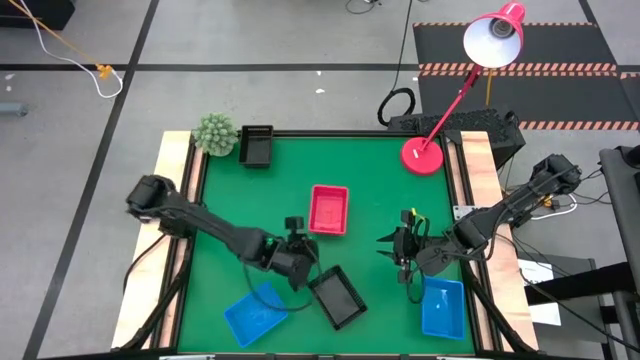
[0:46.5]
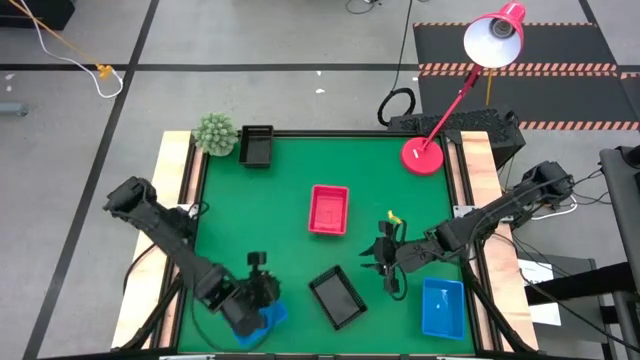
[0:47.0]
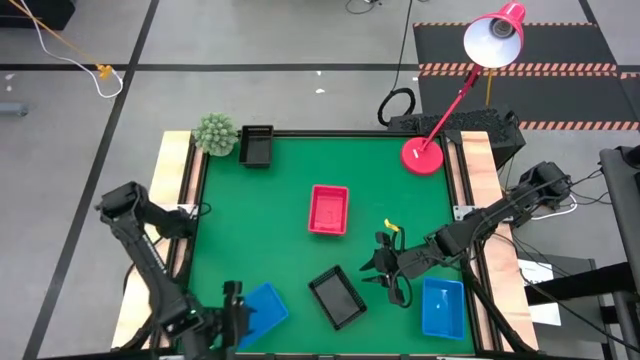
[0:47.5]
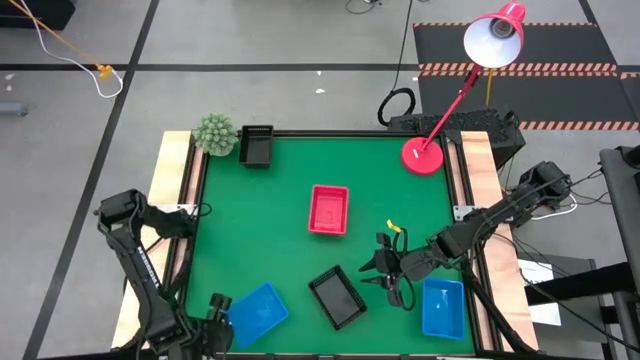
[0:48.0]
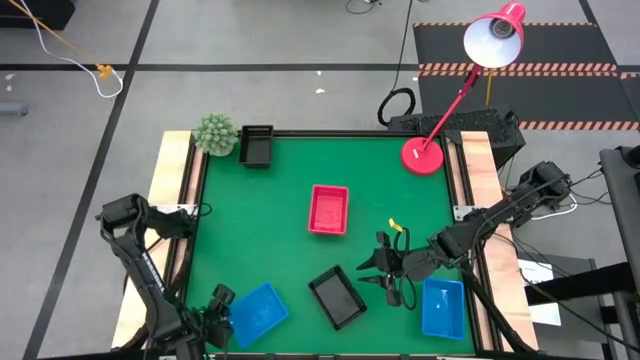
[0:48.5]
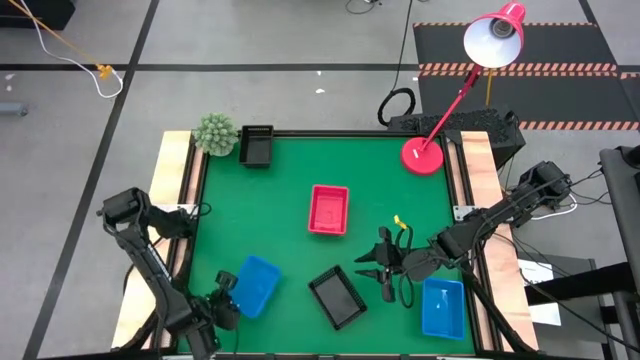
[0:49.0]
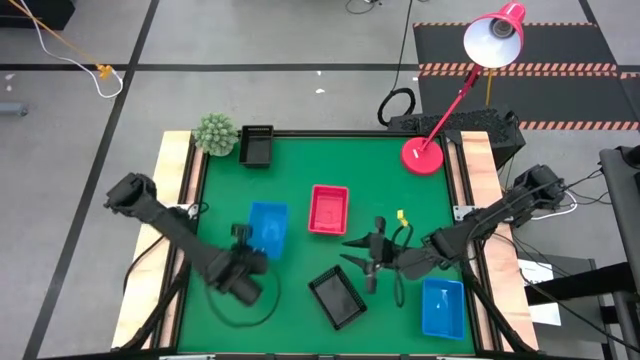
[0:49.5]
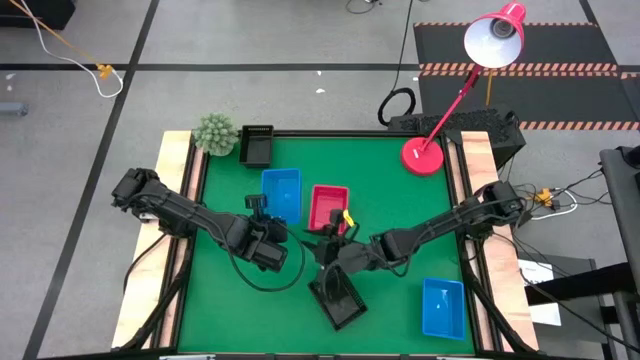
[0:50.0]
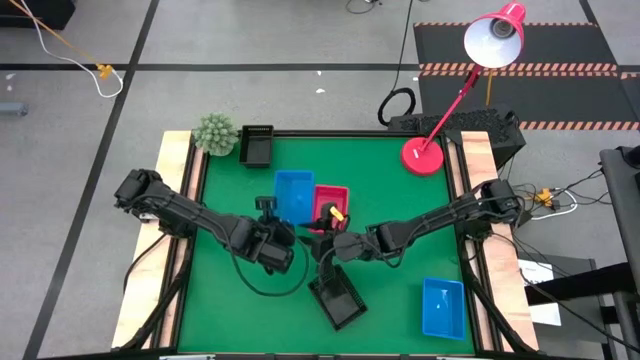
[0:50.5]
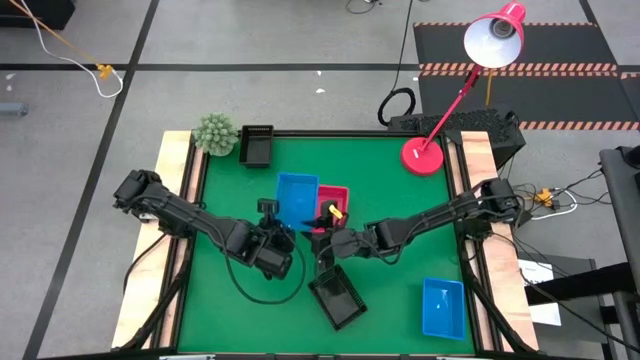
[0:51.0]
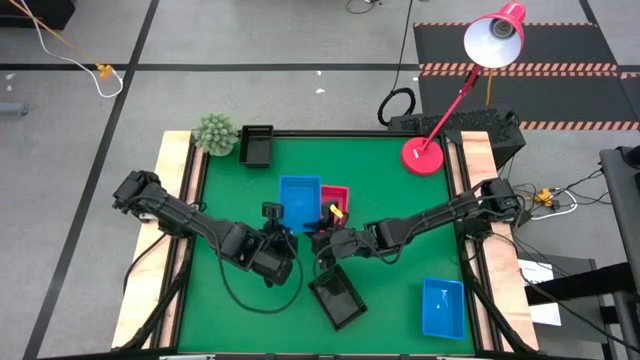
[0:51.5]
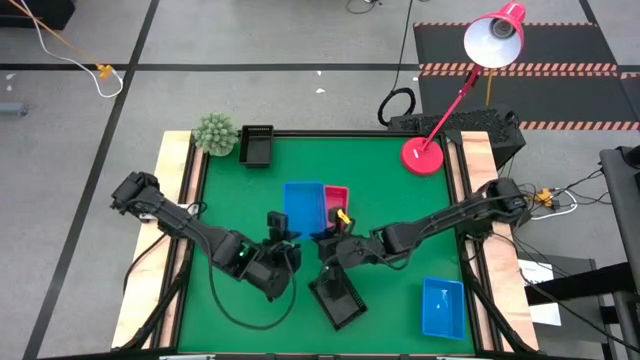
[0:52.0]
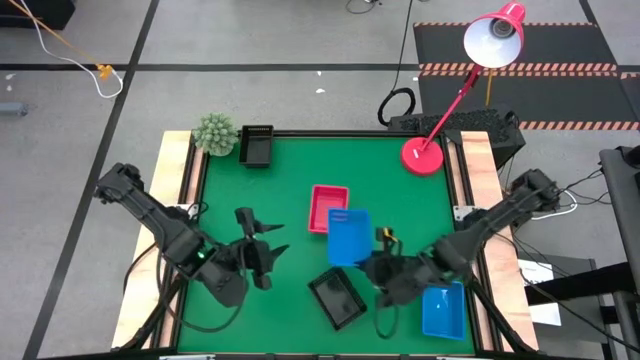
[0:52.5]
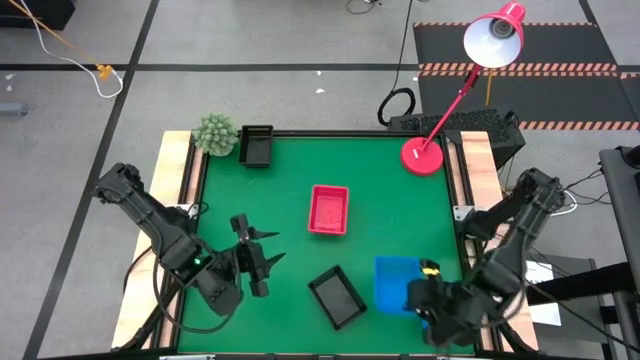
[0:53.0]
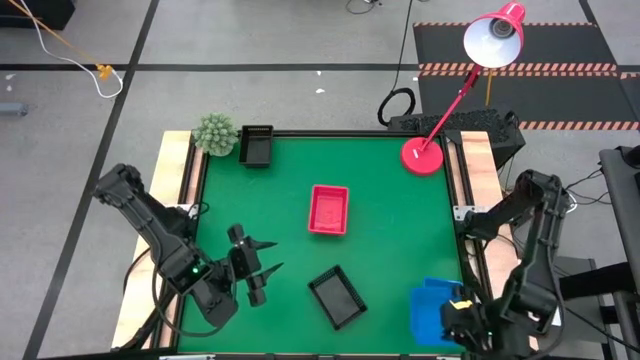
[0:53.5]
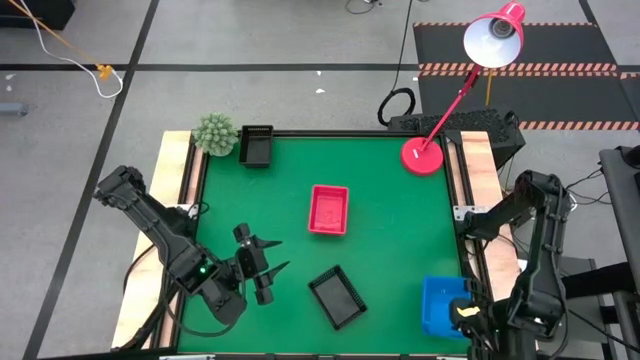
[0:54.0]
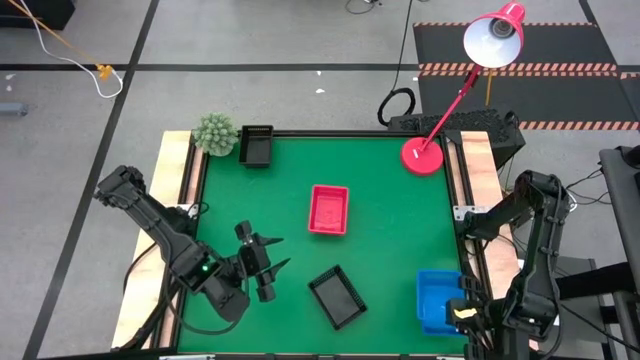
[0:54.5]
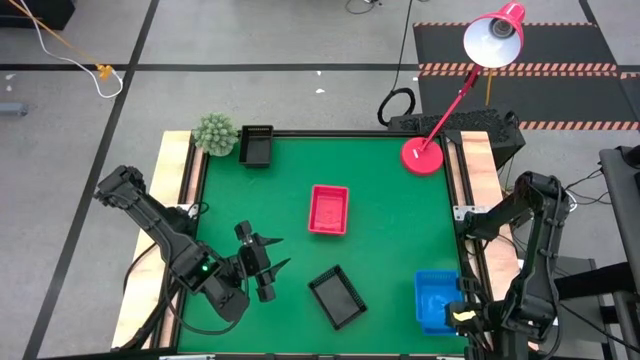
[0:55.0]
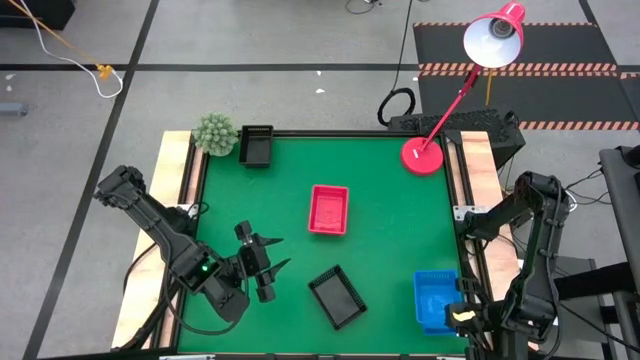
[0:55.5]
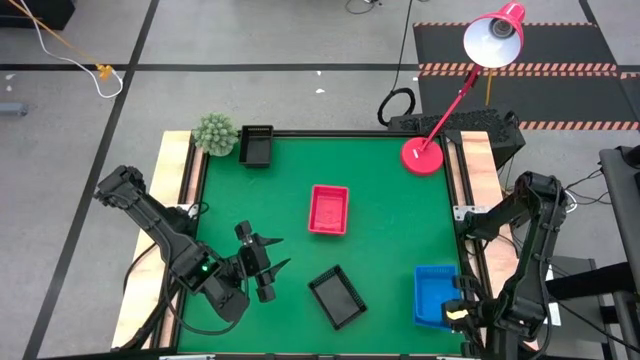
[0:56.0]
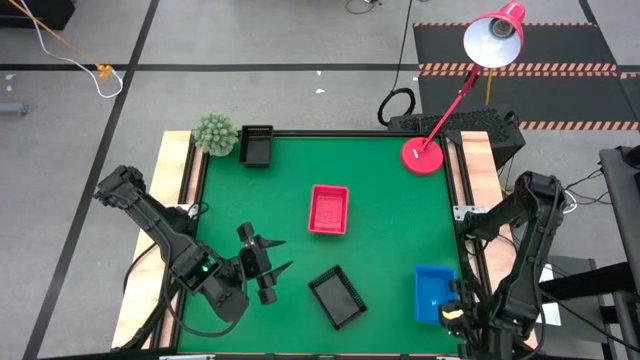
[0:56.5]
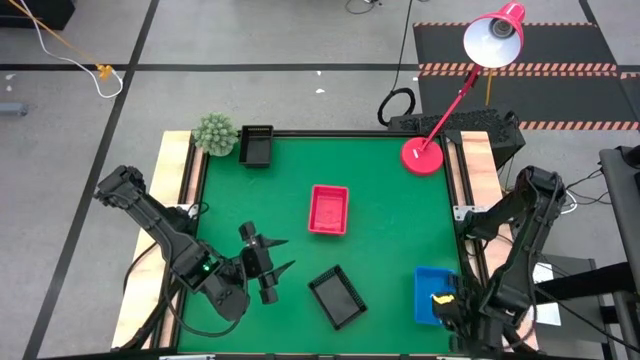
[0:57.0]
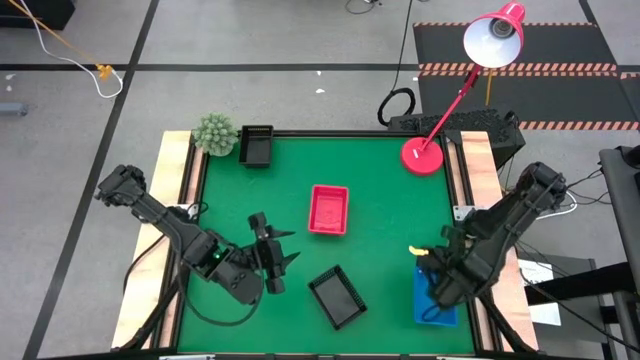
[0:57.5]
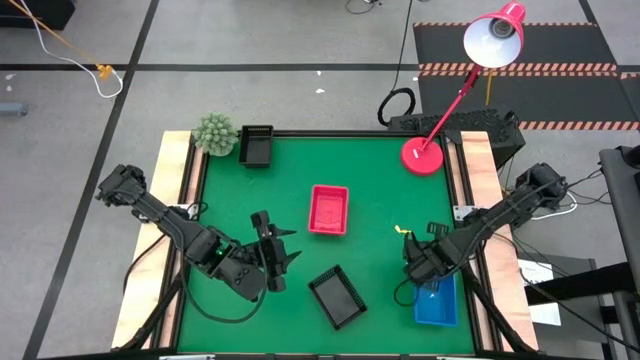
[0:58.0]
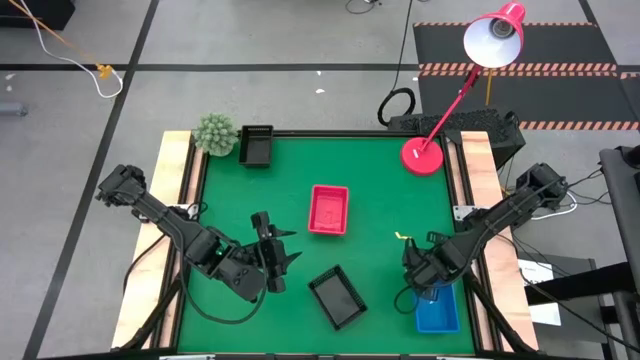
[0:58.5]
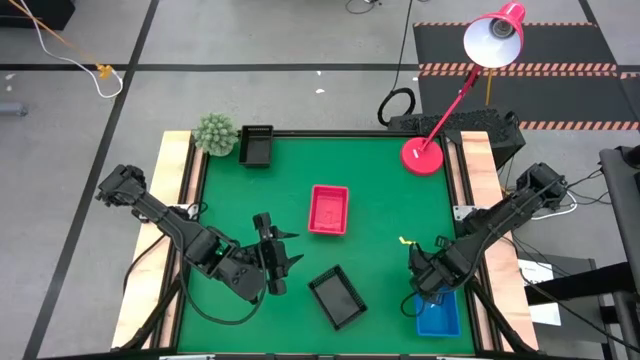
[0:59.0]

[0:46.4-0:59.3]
Stack the left blue bin on the stacked blue bins

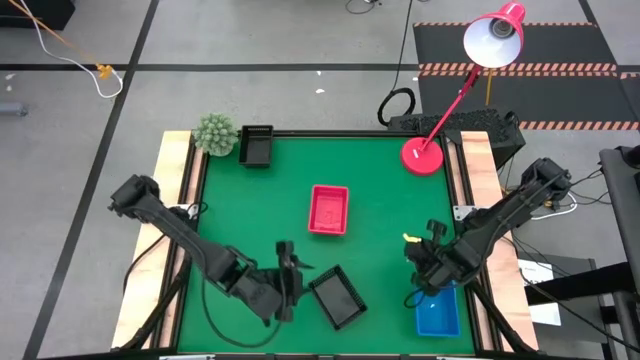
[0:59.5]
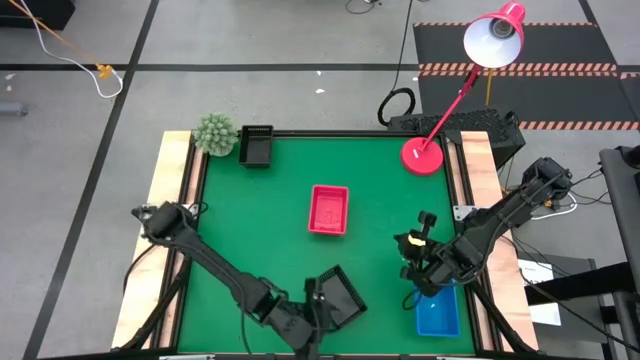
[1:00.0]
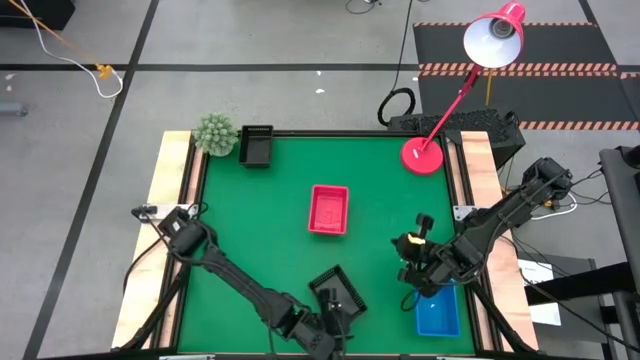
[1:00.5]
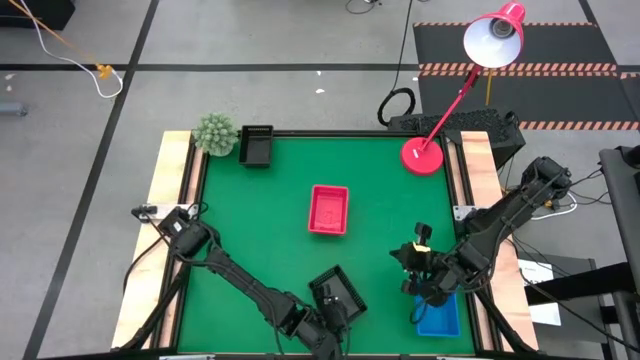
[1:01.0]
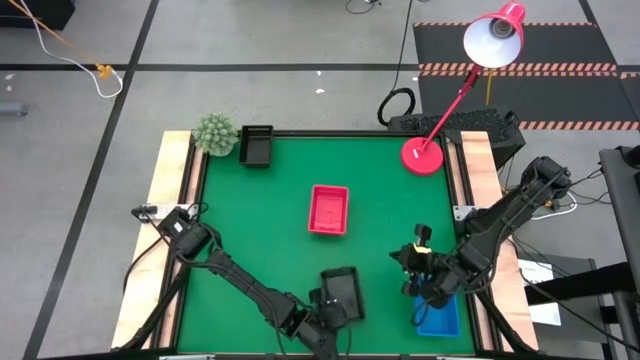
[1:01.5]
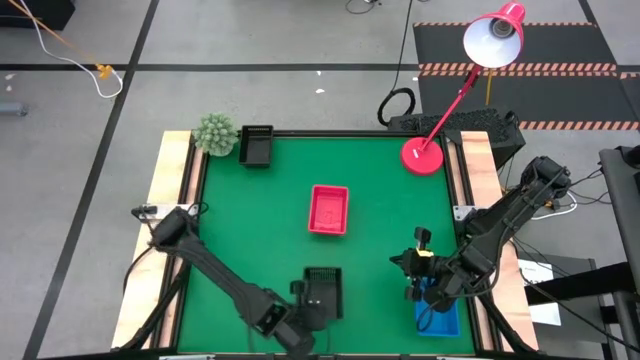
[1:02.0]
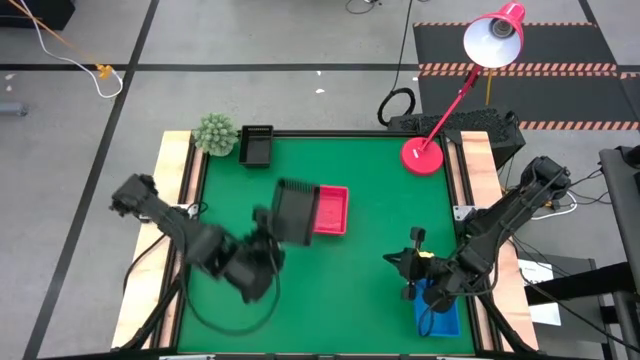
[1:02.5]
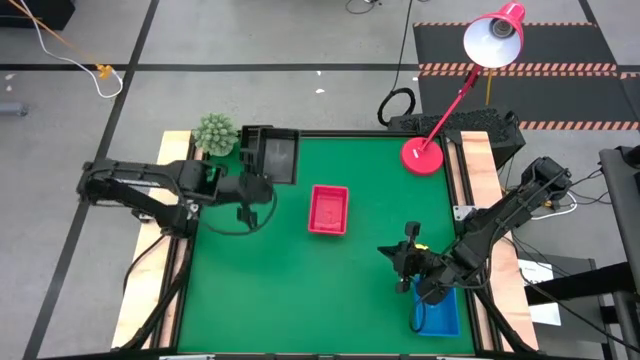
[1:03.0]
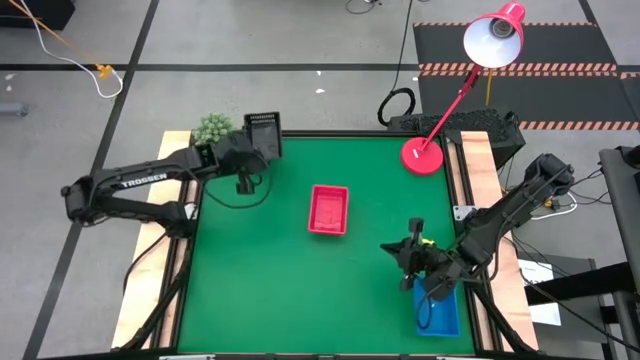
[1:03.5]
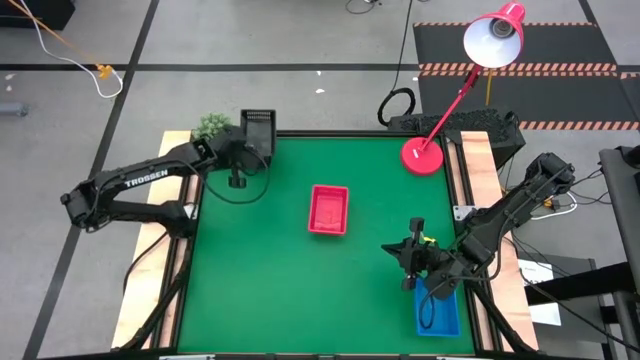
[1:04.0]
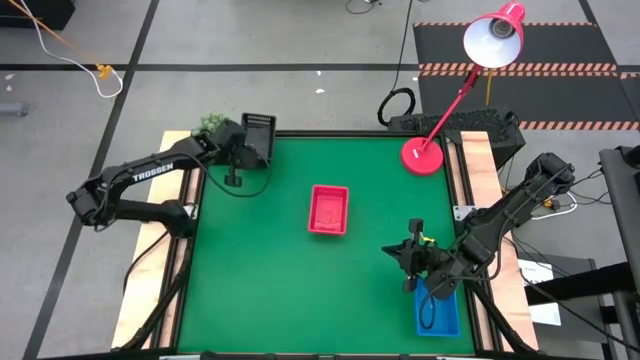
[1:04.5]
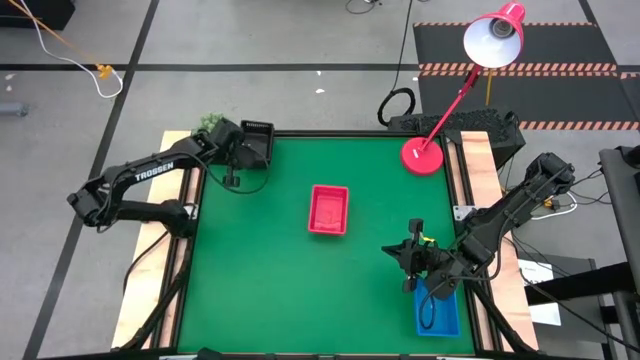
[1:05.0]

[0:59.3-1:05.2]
Stack the bottom black bin on the stacked black bins
